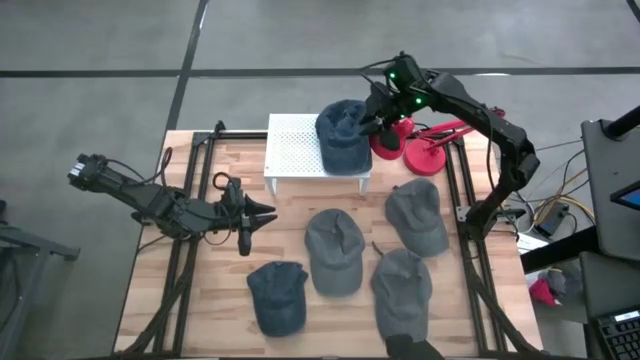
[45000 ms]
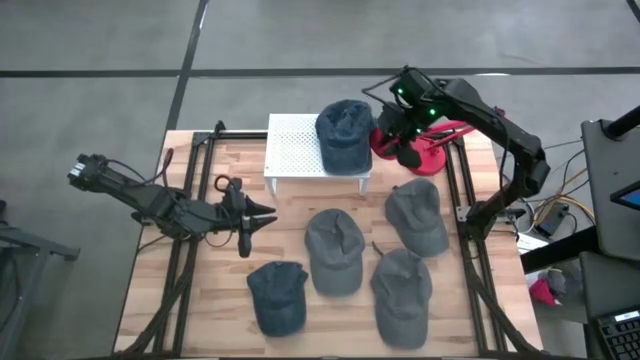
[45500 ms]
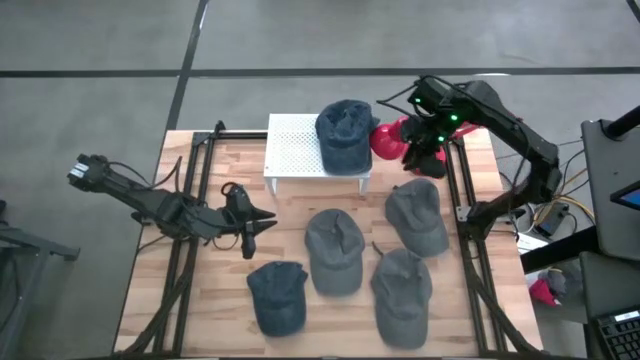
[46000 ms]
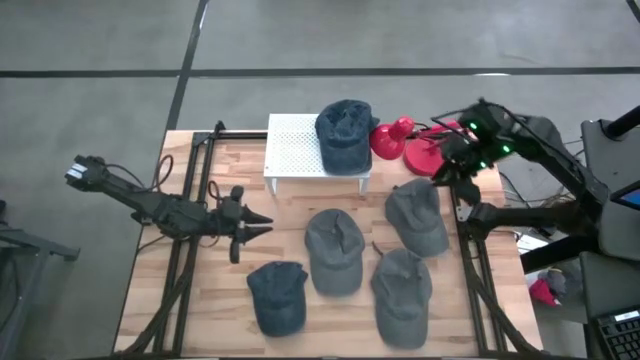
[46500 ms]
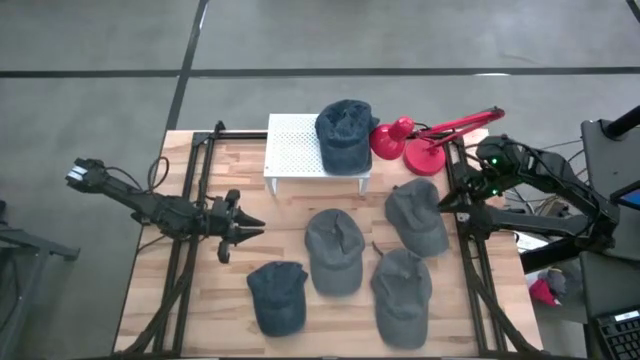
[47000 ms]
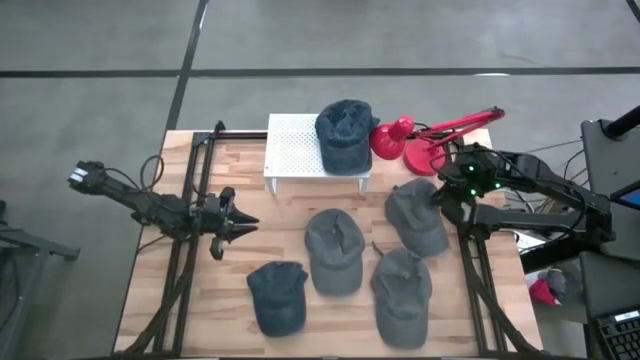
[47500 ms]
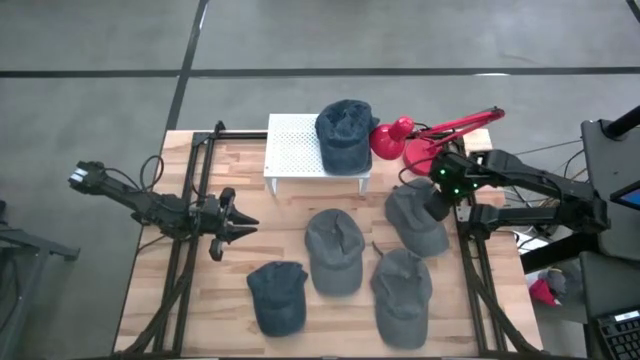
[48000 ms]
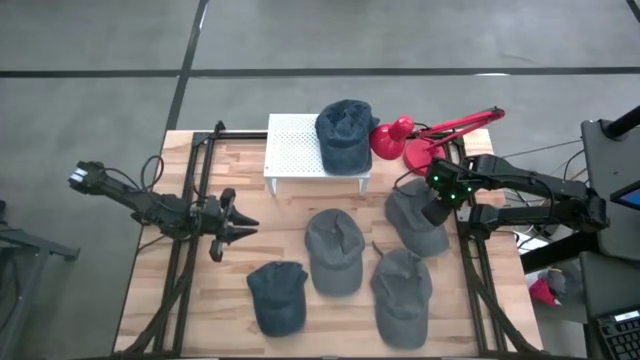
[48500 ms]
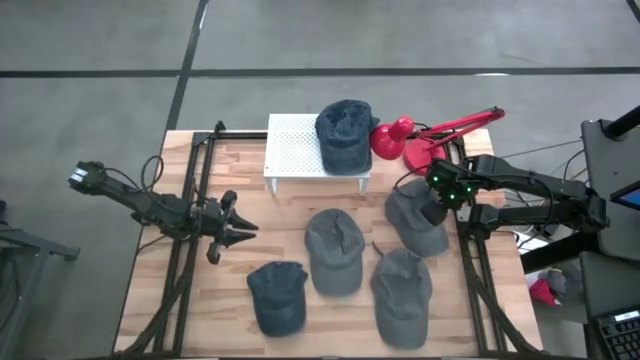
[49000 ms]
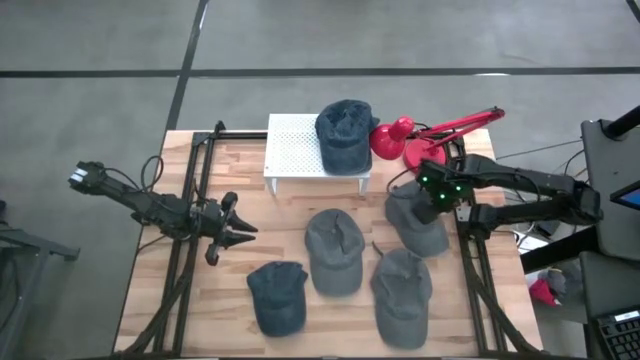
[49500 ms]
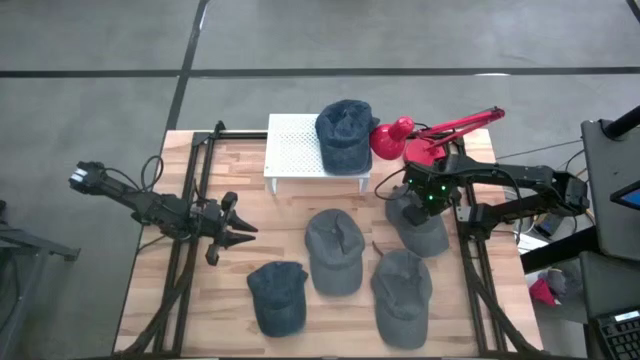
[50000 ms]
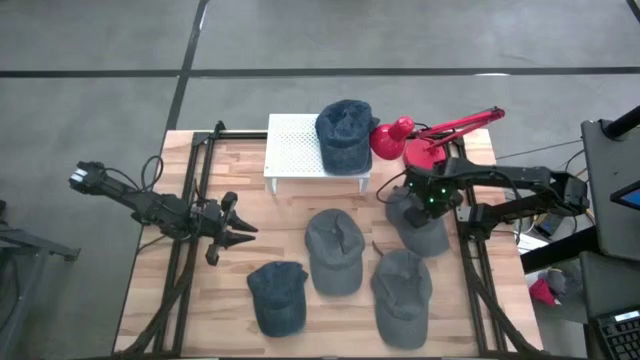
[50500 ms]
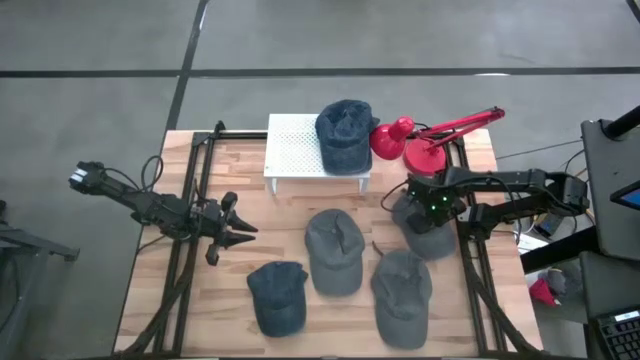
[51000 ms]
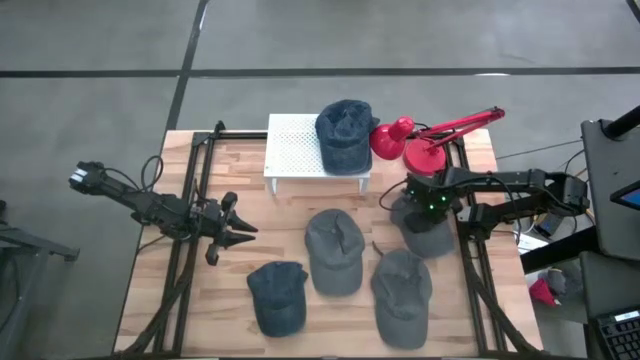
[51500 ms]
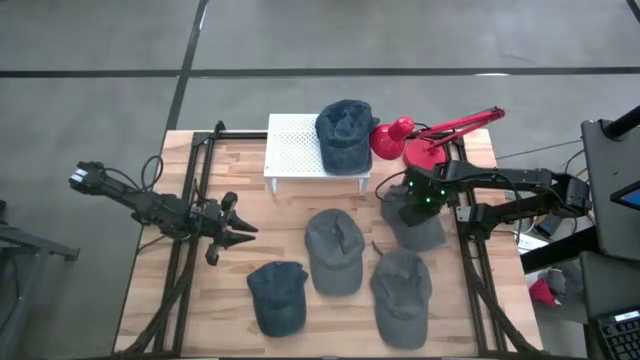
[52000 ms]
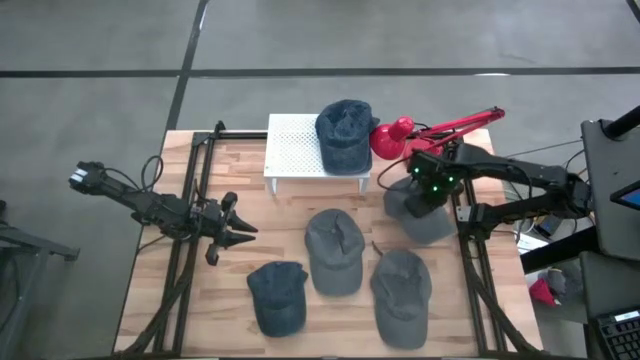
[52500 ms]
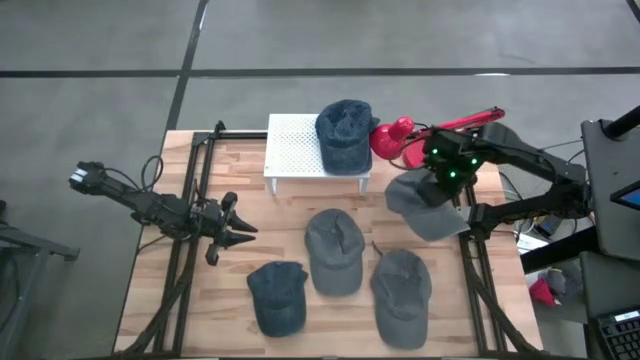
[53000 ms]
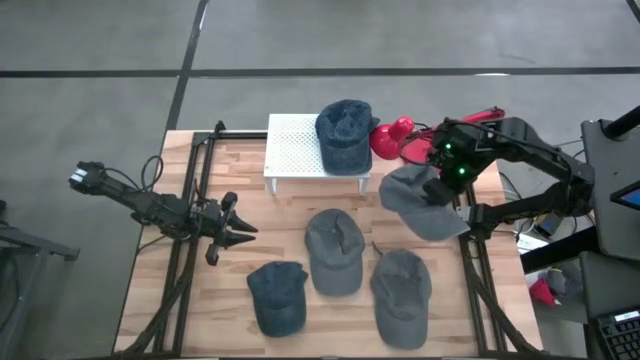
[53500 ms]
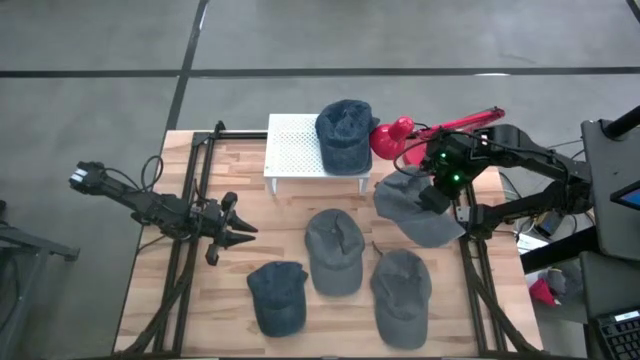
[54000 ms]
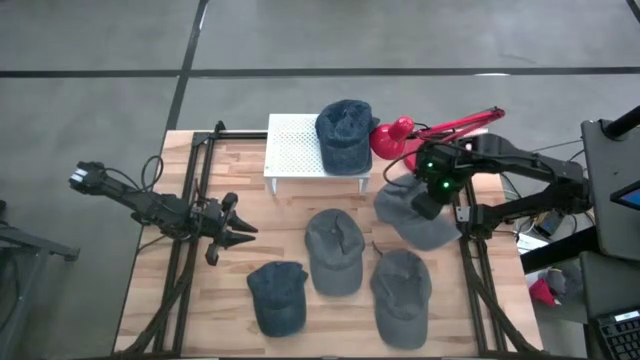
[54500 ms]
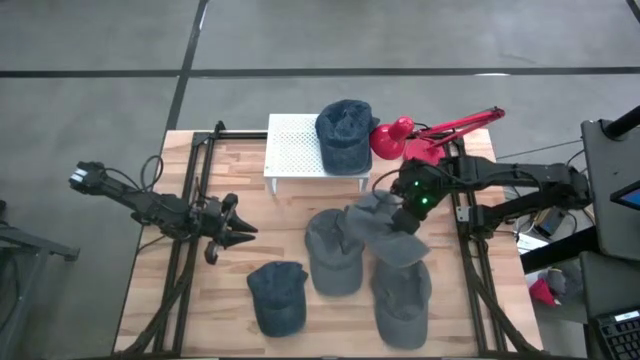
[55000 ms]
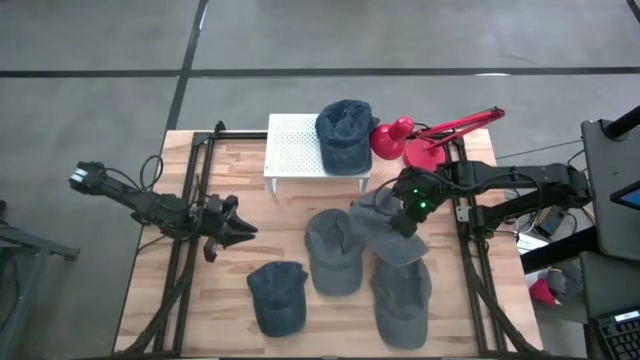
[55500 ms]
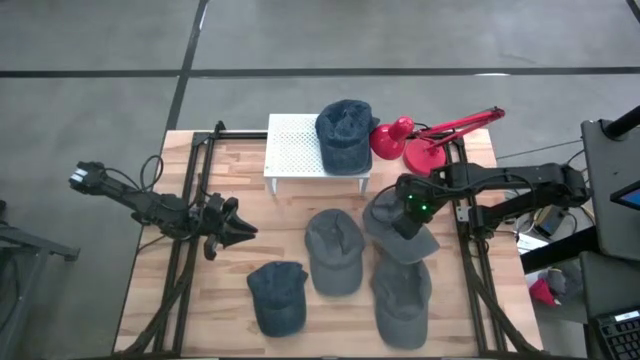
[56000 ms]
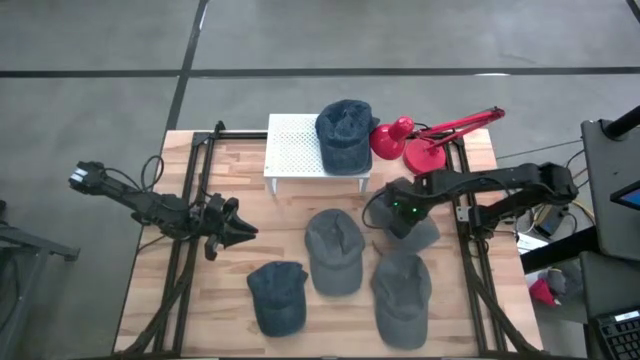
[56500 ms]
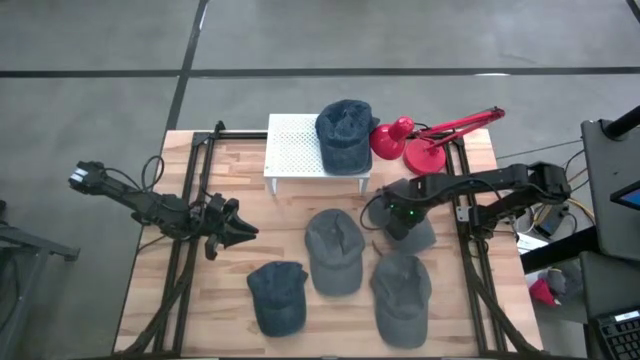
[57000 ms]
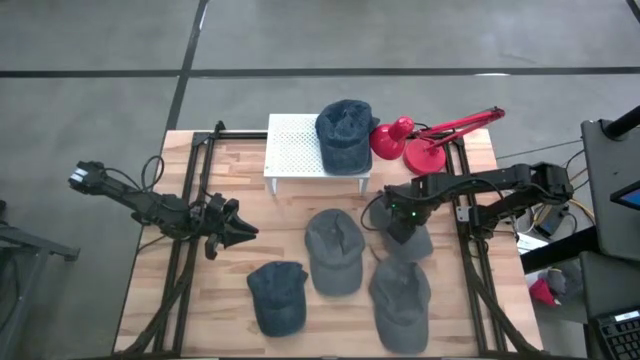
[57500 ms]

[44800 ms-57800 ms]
Task: Pick & Place hat
Stack the blue cap on top of the blue cap on the shelf

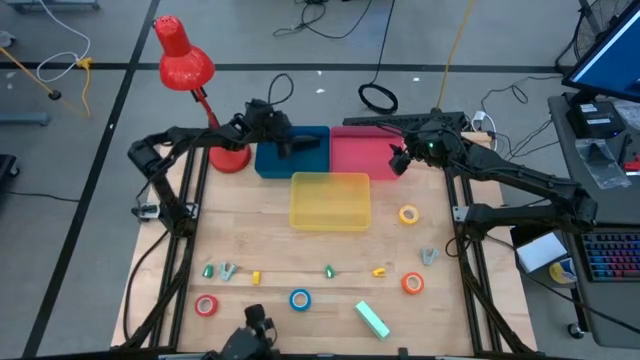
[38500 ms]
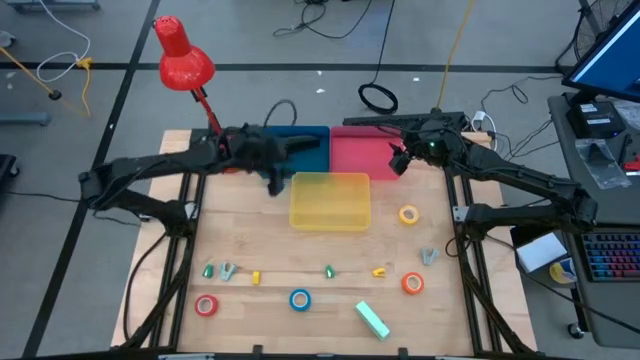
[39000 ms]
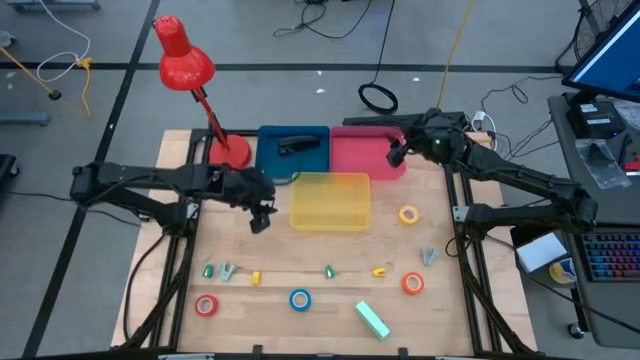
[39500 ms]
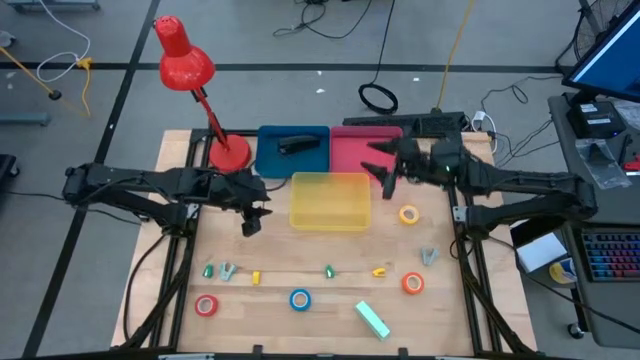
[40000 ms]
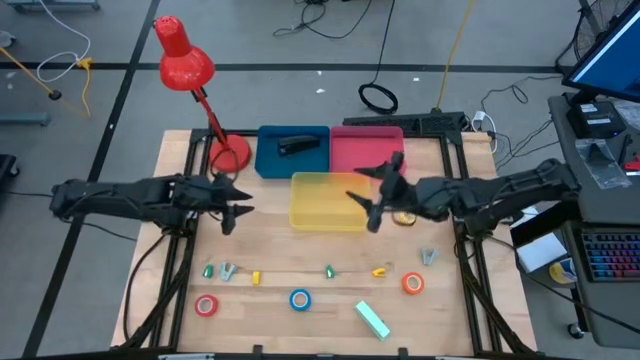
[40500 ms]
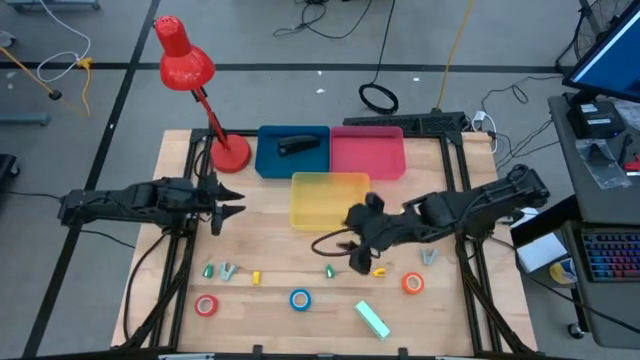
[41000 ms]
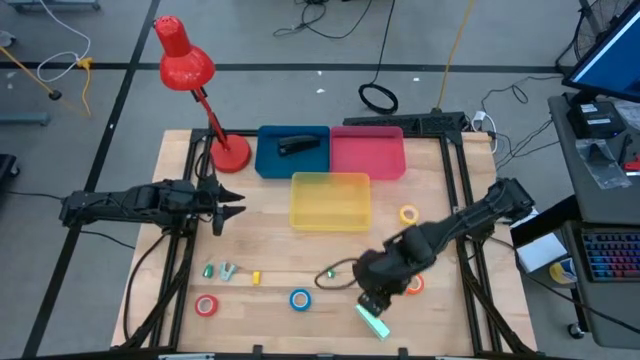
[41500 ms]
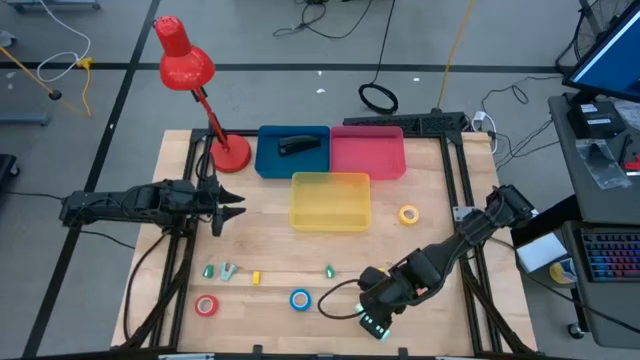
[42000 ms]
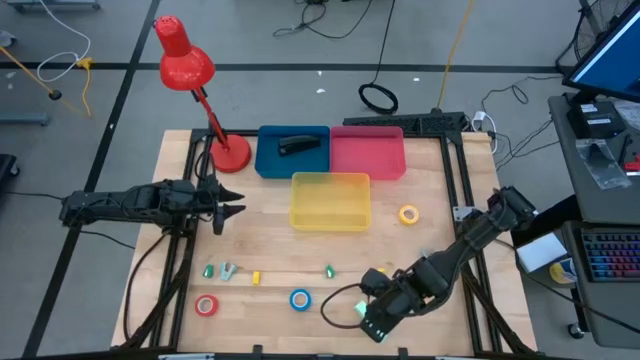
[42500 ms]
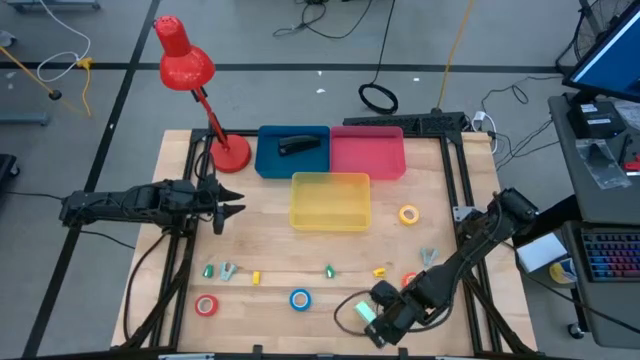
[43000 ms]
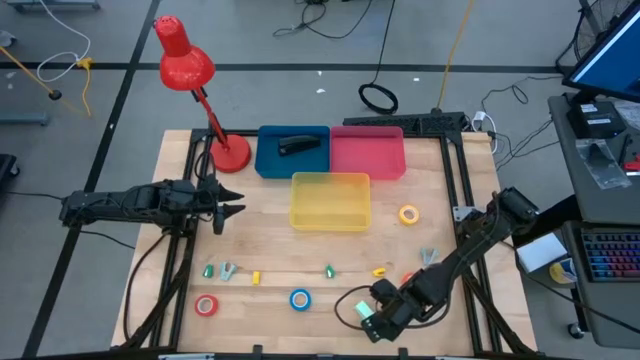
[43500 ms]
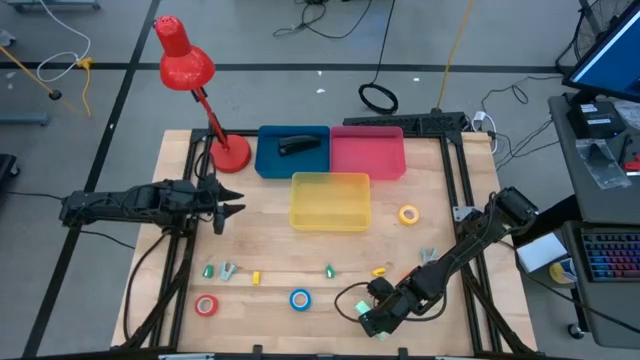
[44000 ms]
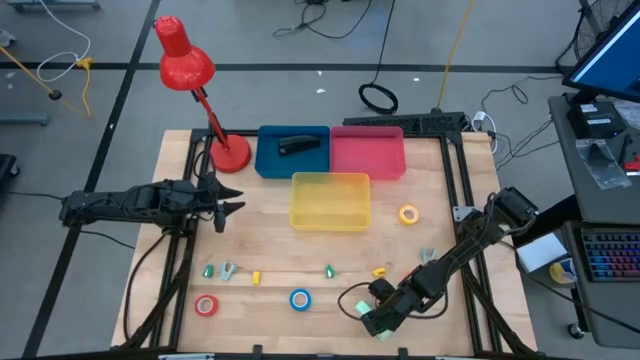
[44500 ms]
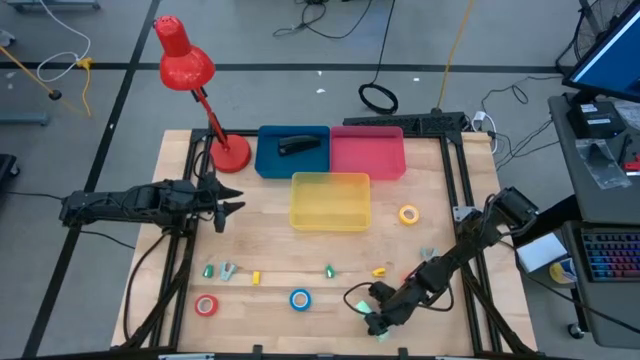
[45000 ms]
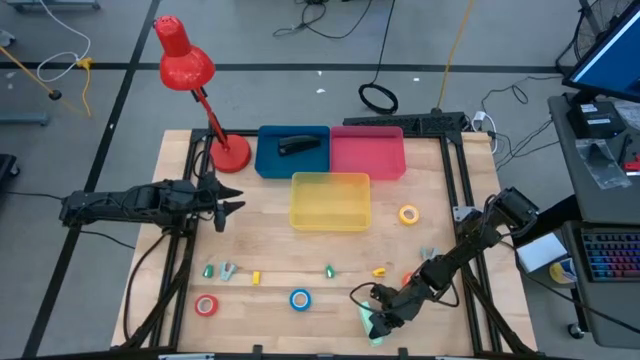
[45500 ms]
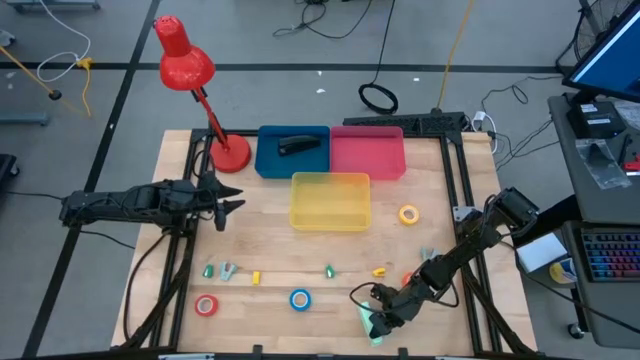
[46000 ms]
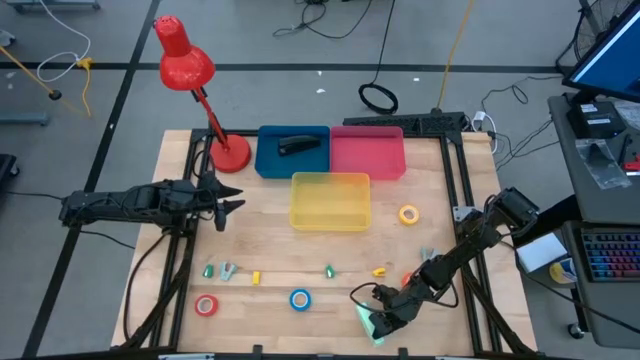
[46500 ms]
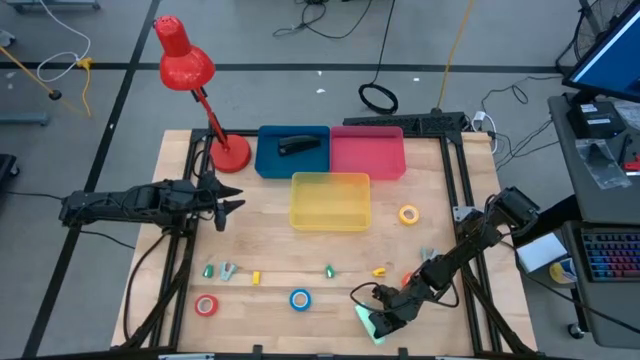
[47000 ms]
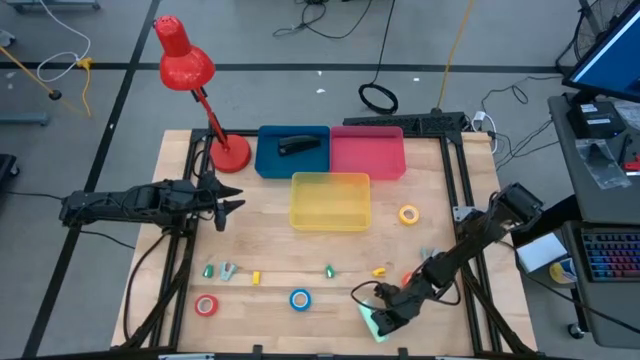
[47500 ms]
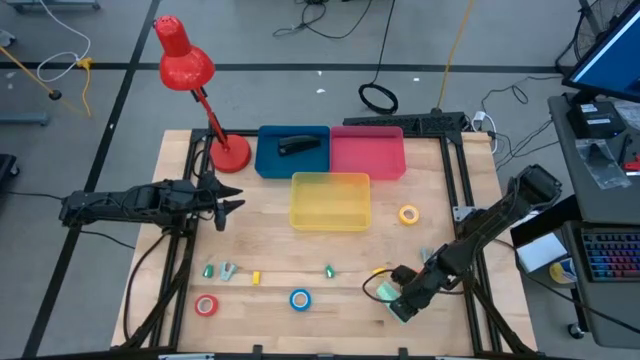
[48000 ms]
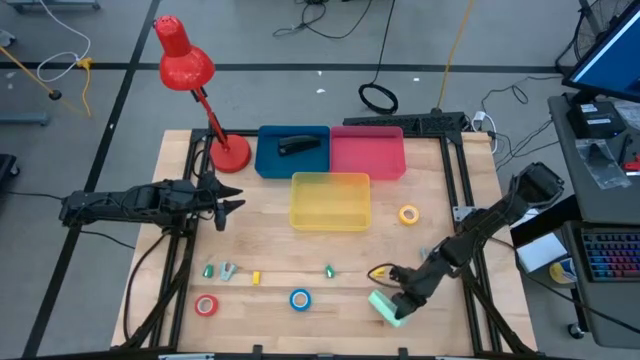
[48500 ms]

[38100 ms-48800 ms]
Task: Pick and place Stapler, Stapler remover, tape
Put the light green stapler into the blue bin
